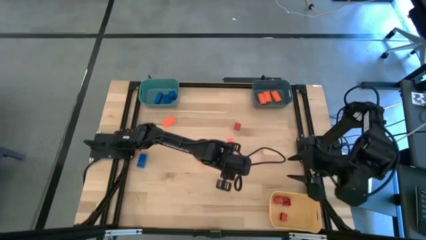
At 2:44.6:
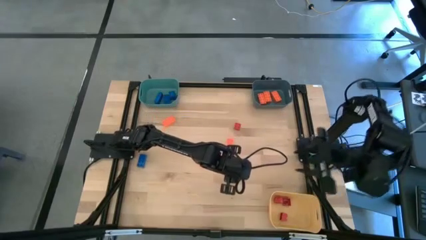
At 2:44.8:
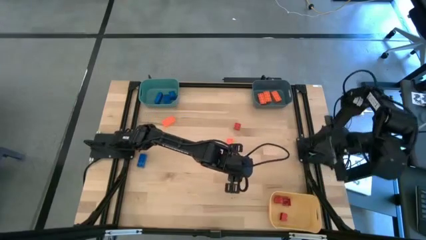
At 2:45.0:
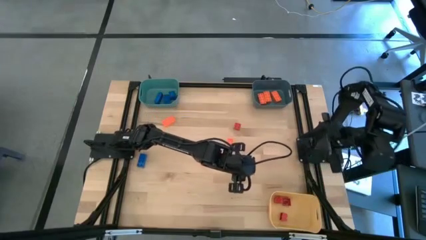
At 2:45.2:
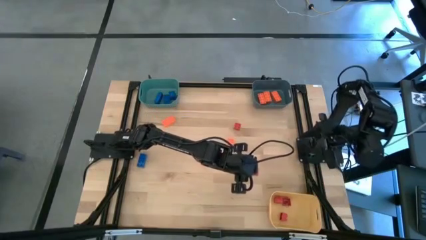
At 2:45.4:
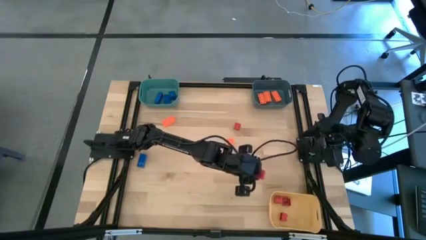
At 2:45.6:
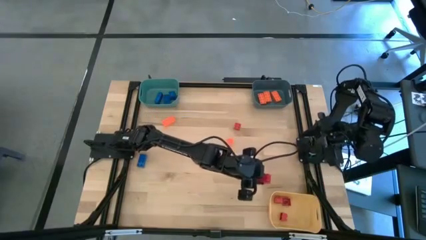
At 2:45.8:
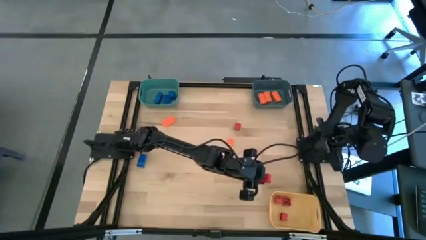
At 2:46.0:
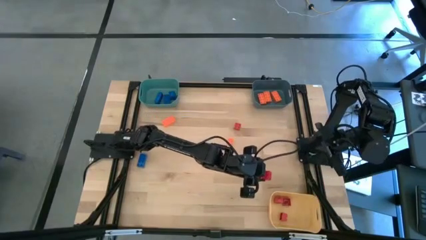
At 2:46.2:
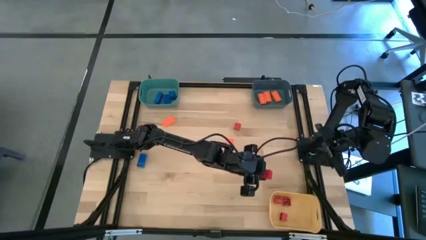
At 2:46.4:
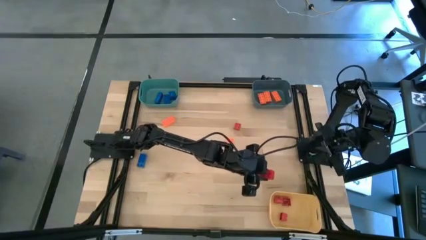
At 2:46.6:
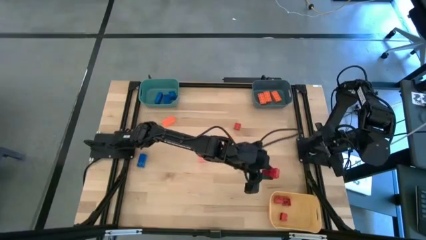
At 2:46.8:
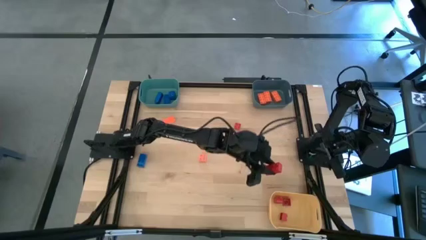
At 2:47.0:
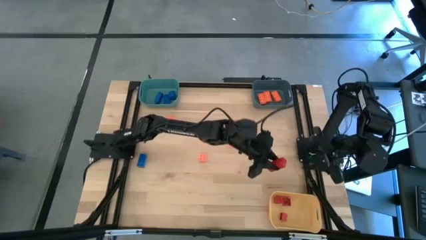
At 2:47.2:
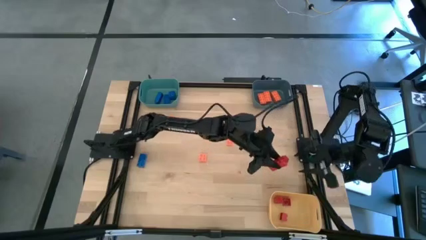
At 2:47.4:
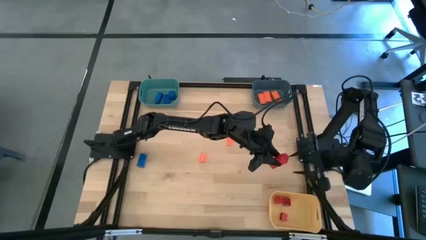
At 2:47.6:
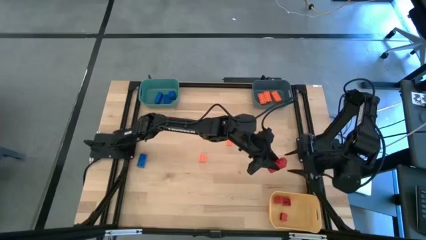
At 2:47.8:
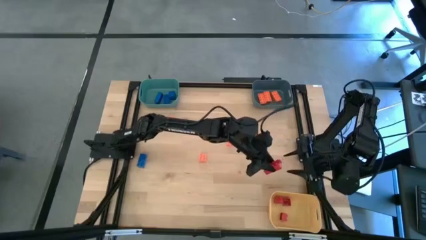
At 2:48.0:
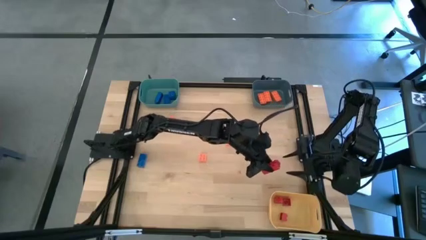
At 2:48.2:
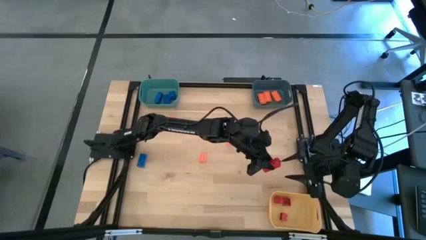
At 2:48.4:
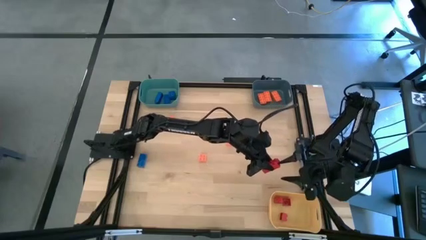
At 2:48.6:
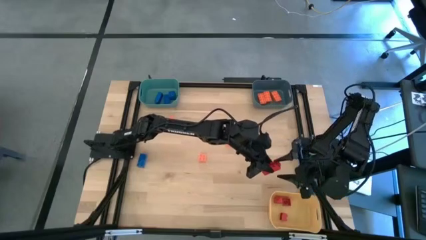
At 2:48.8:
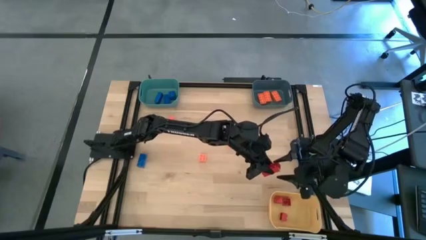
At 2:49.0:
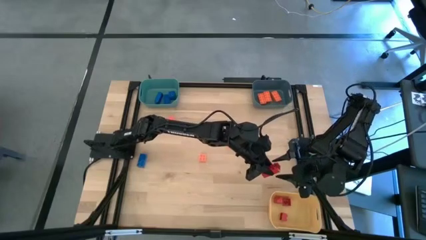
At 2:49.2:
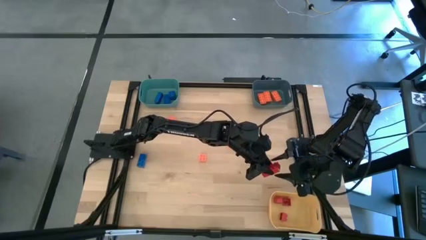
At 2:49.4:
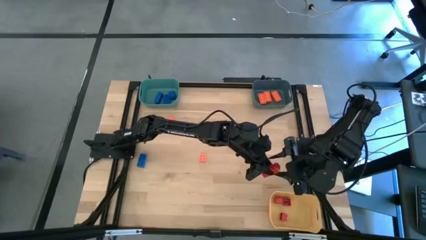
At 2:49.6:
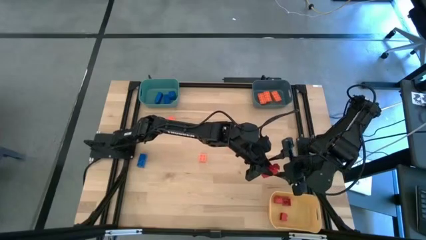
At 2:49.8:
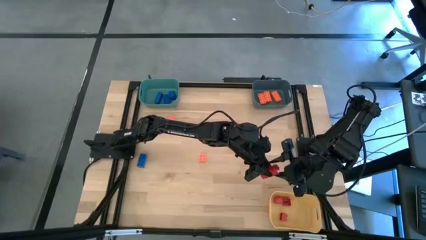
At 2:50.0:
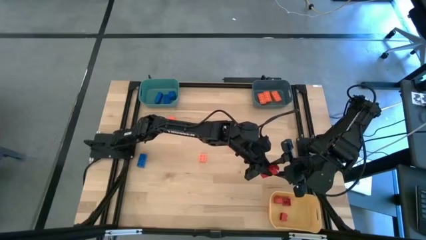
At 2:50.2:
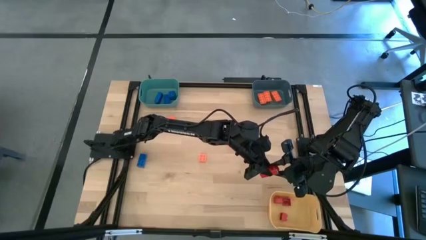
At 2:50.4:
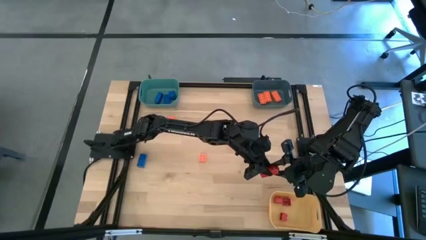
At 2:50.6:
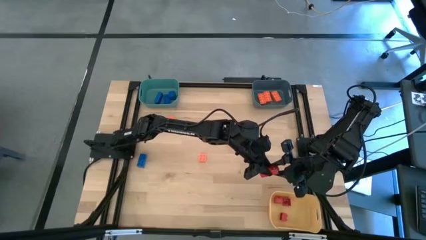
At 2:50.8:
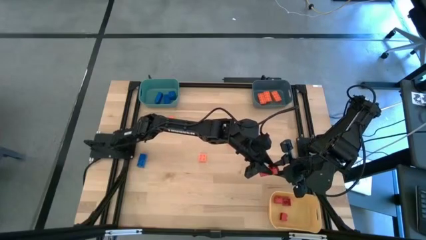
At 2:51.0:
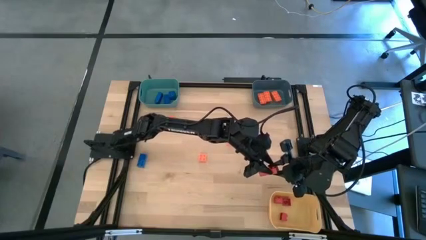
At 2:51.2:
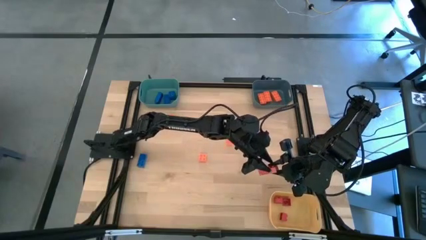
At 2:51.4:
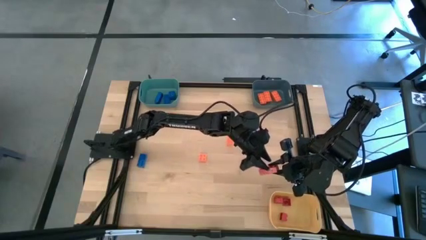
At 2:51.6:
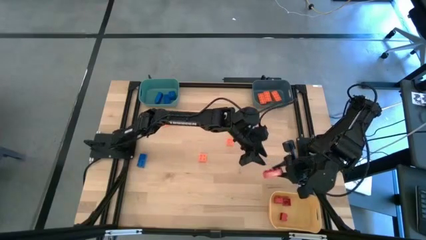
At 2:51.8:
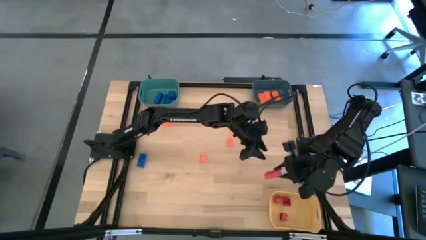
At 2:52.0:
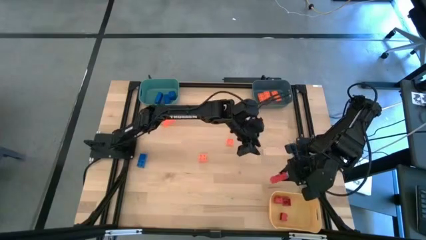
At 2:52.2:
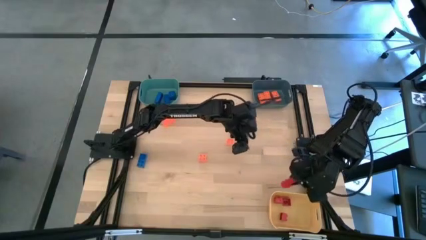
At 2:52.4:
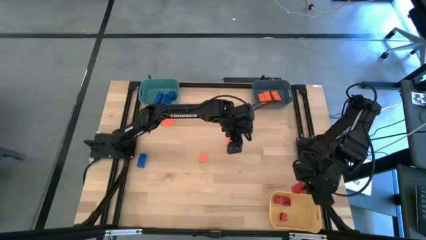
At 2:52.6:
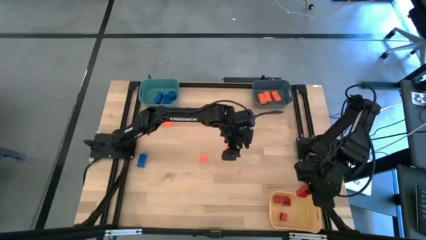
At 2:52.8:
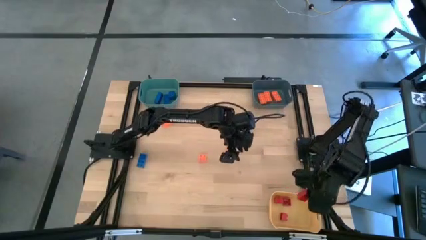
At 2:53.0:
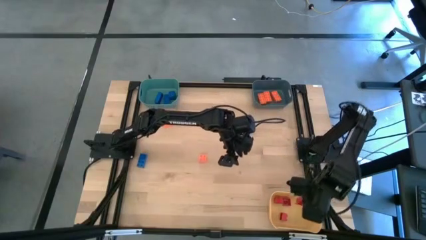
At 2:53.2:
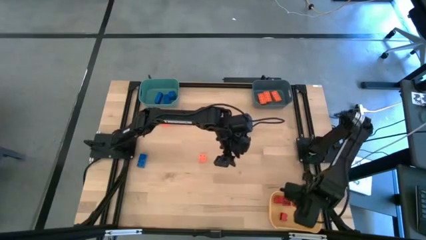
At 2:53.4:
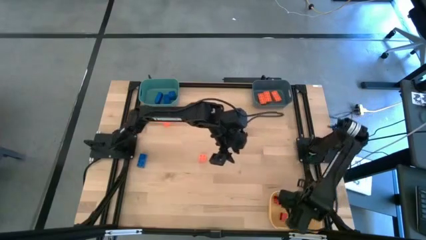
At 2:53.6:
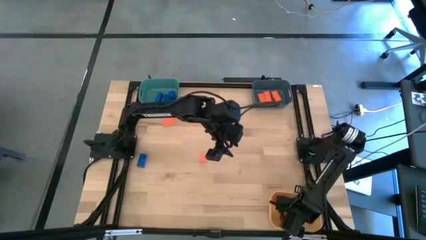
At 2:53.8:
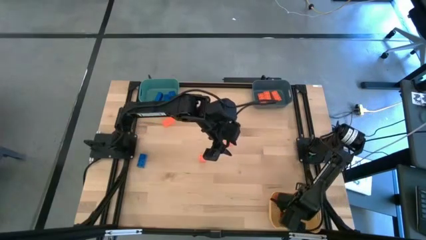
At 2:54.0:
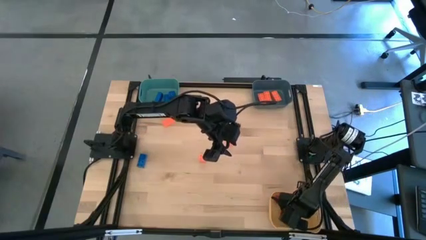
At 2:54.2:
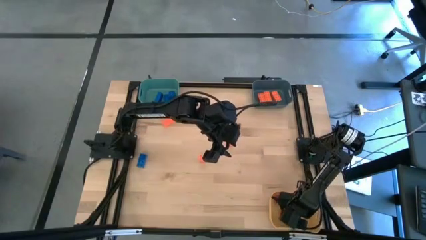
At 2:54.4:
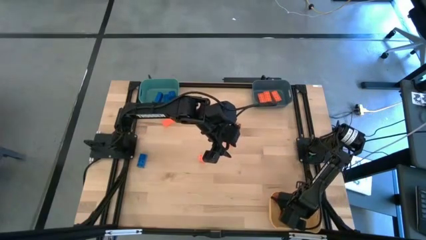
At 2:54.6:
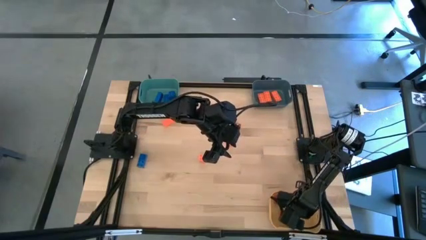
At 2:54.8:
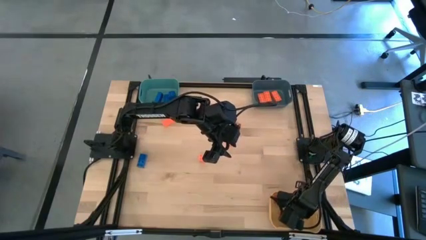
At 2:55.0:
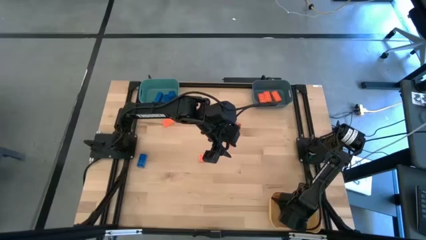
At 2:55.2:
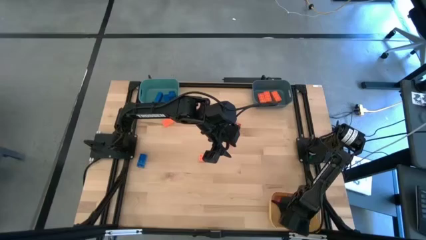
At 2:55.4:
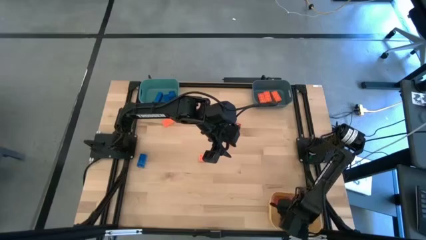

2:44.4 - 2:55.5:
Task: Sort & place blocks by color
Put the red game piece into the yellow bin
